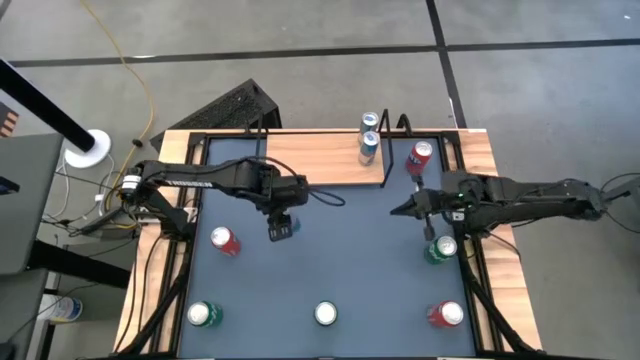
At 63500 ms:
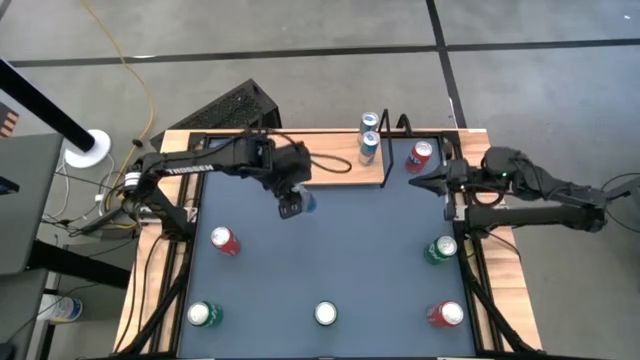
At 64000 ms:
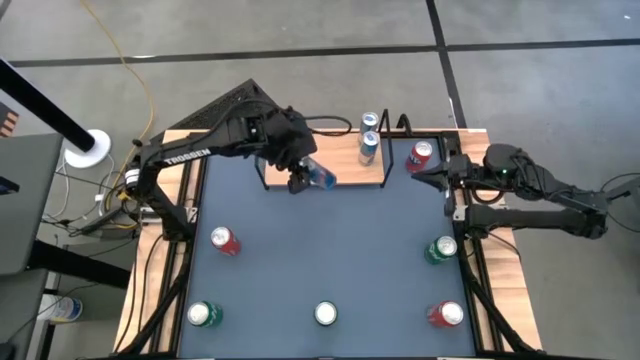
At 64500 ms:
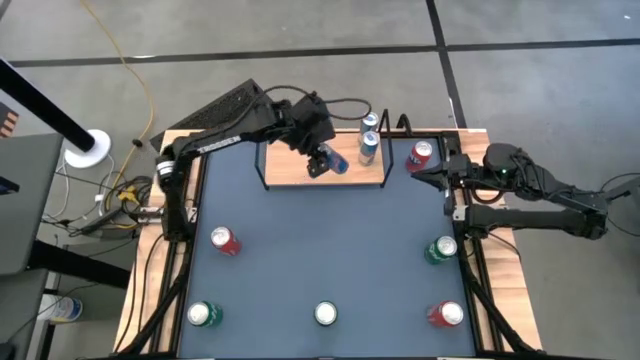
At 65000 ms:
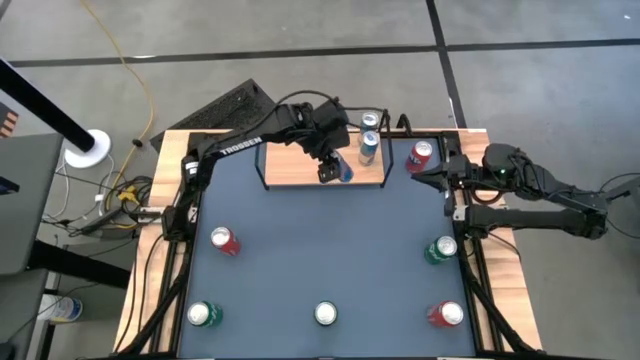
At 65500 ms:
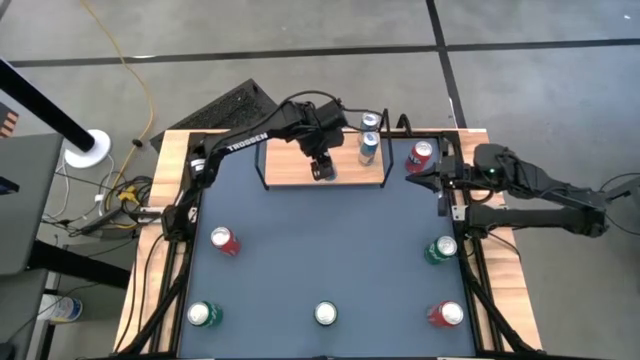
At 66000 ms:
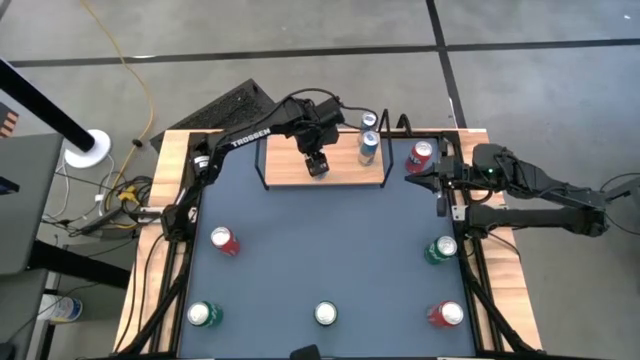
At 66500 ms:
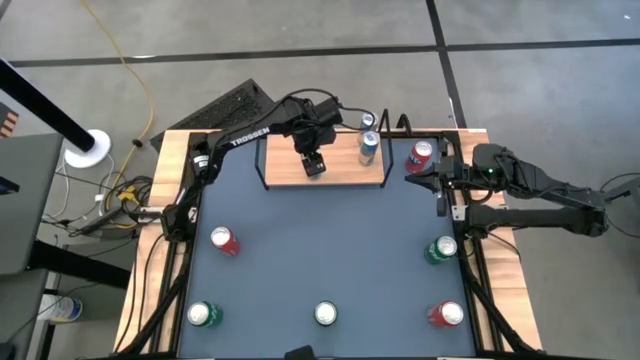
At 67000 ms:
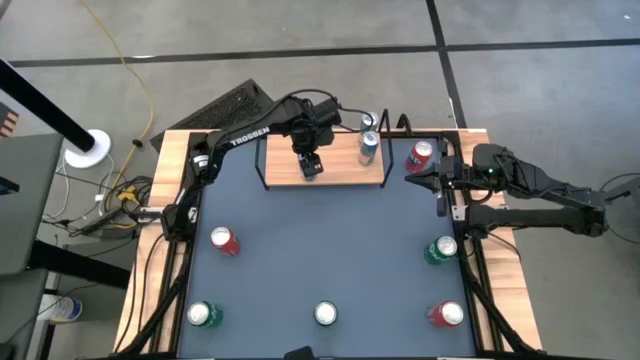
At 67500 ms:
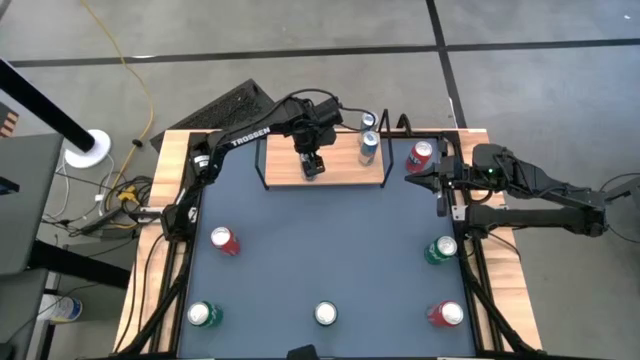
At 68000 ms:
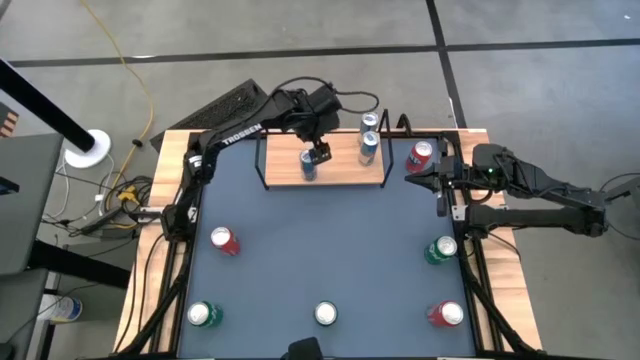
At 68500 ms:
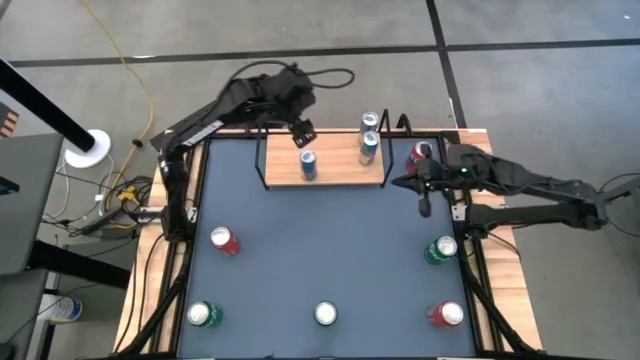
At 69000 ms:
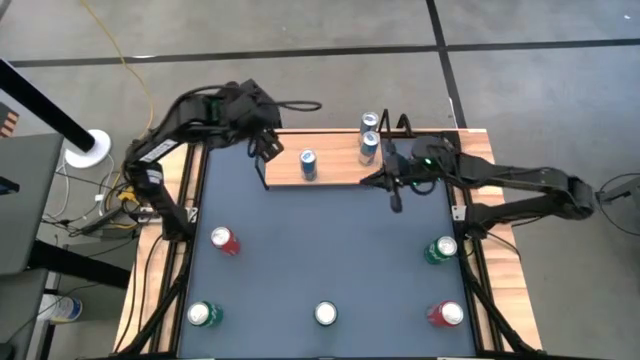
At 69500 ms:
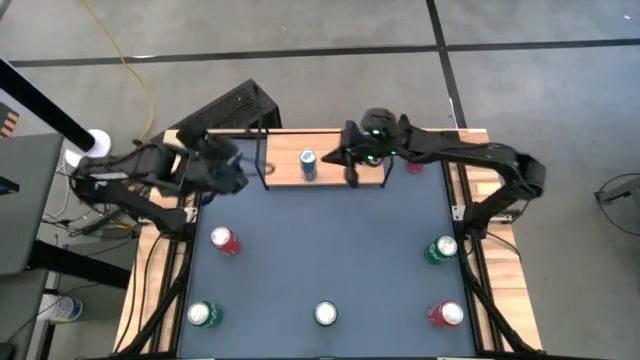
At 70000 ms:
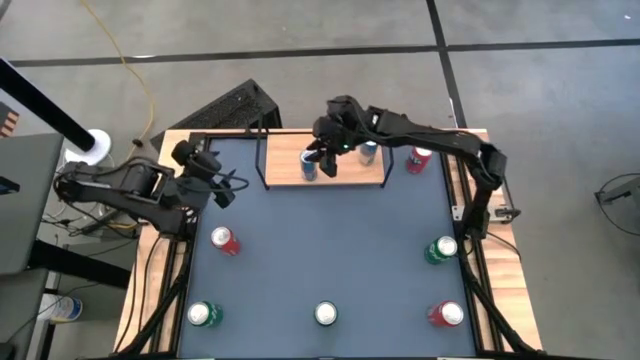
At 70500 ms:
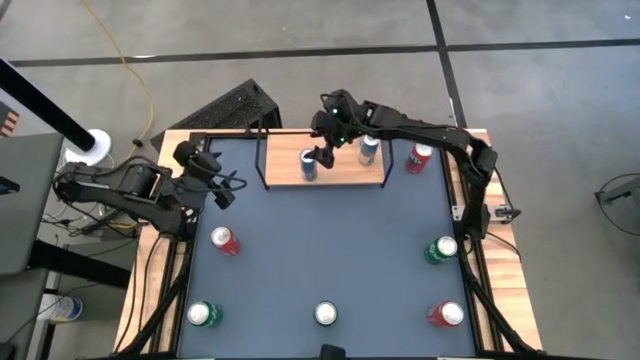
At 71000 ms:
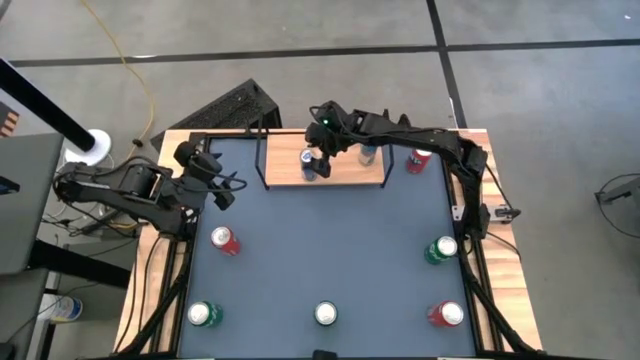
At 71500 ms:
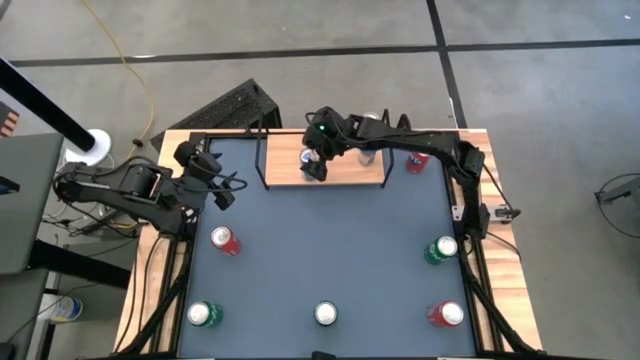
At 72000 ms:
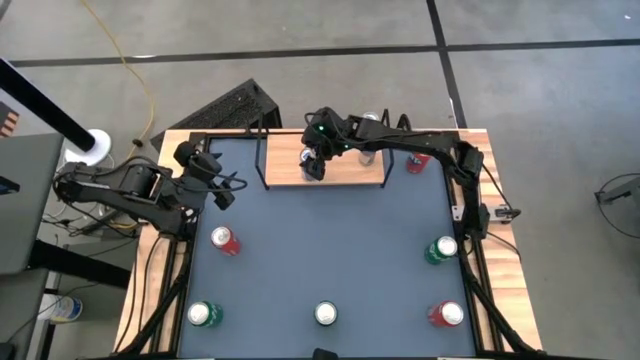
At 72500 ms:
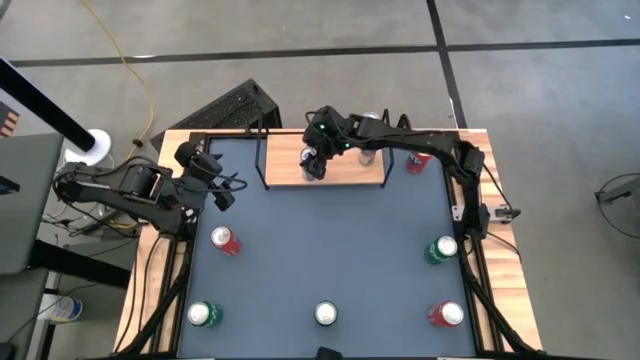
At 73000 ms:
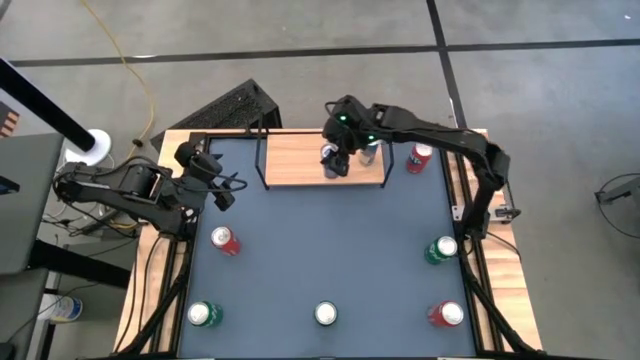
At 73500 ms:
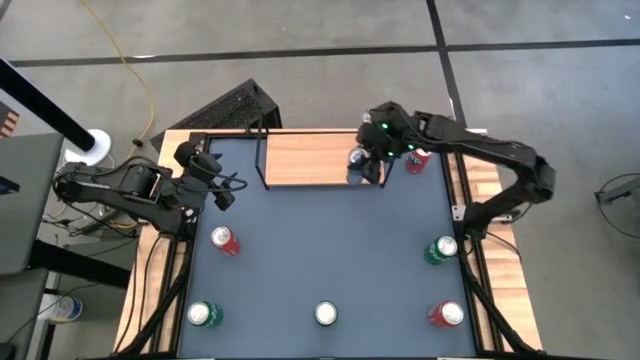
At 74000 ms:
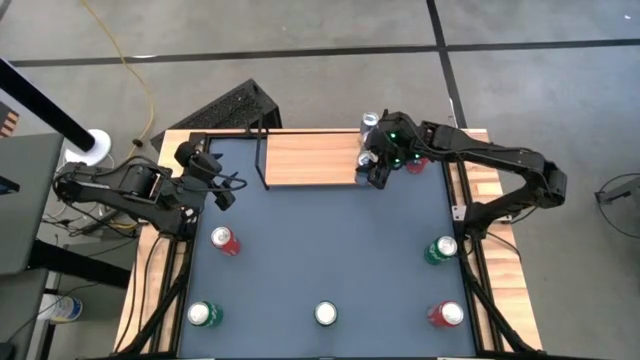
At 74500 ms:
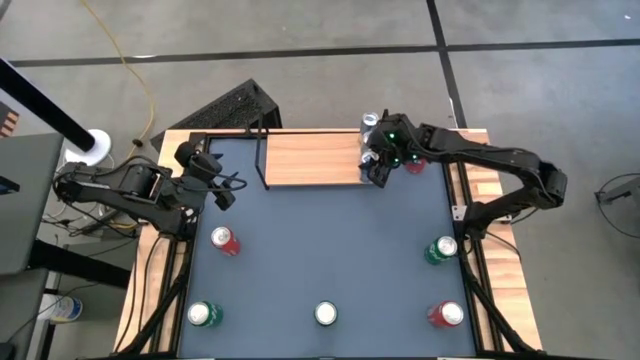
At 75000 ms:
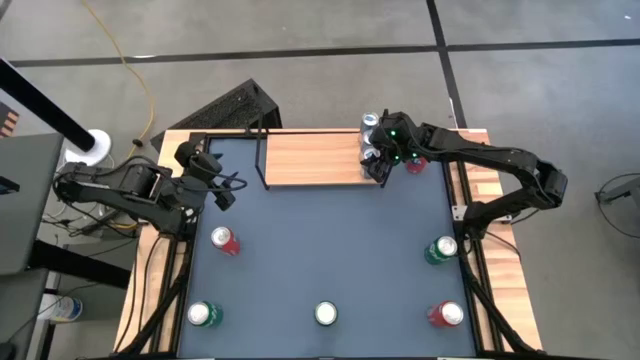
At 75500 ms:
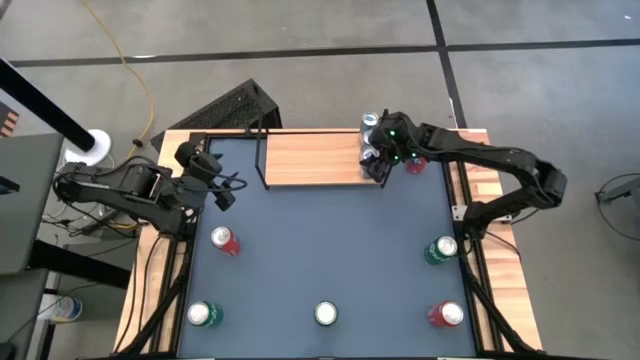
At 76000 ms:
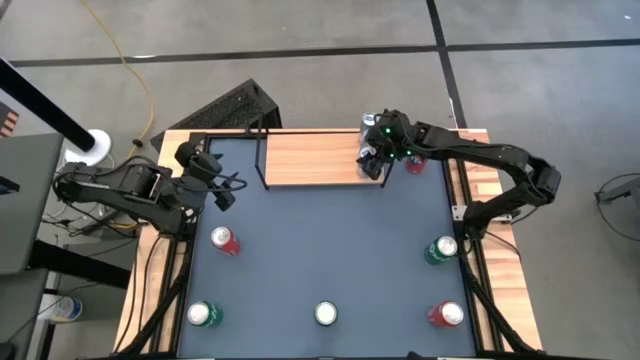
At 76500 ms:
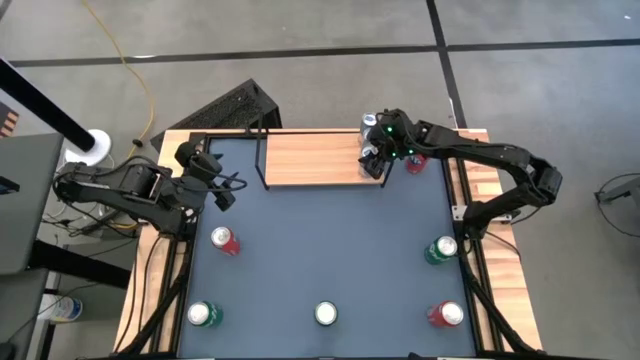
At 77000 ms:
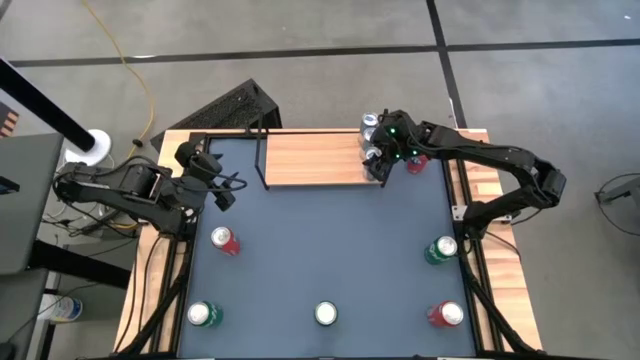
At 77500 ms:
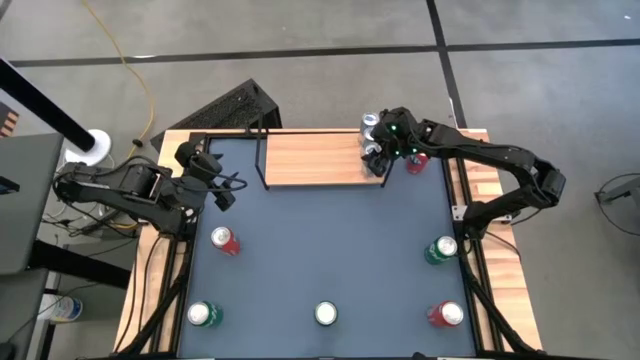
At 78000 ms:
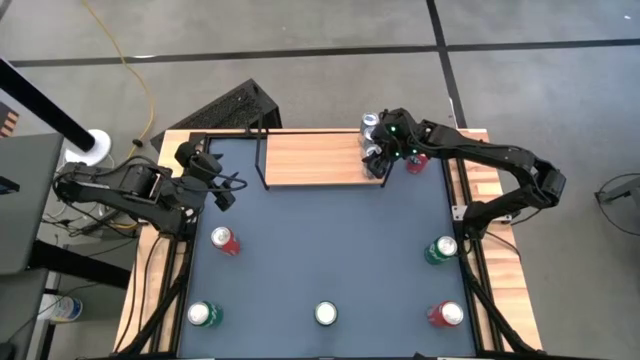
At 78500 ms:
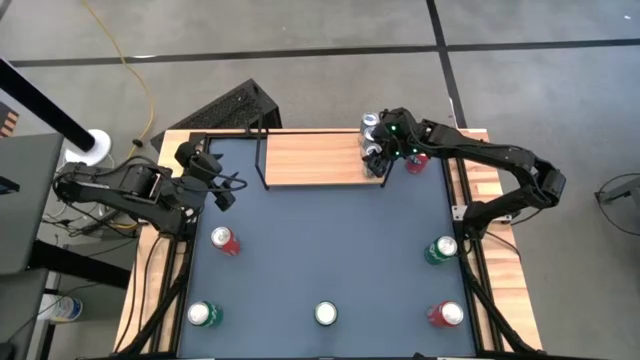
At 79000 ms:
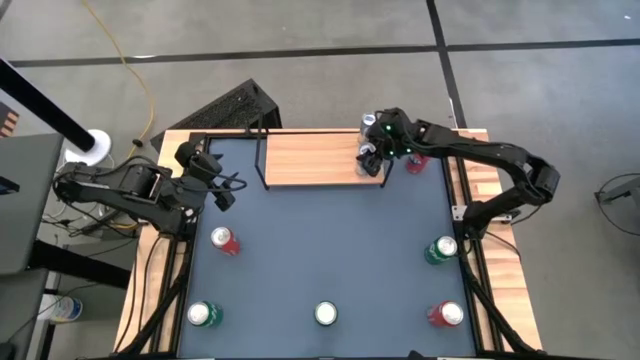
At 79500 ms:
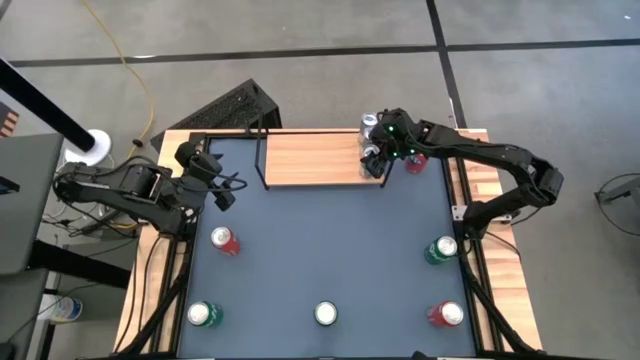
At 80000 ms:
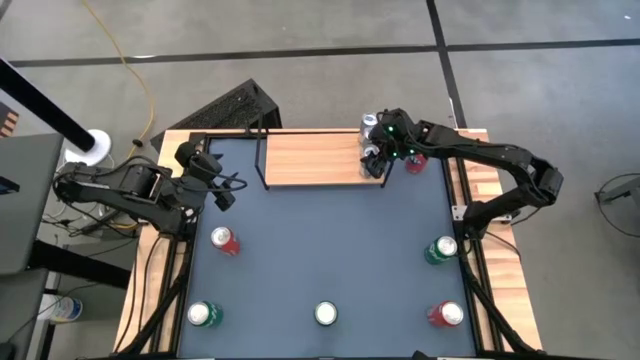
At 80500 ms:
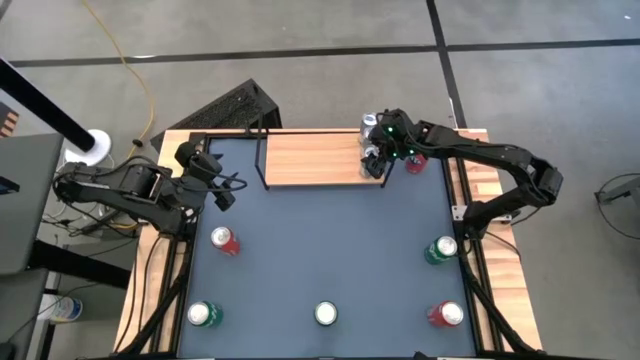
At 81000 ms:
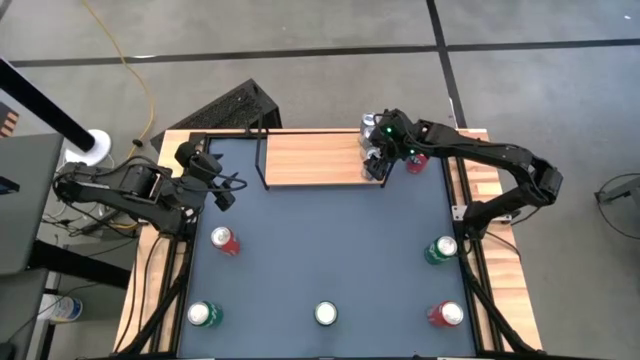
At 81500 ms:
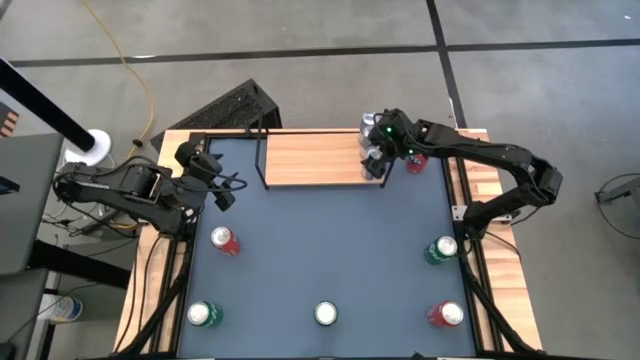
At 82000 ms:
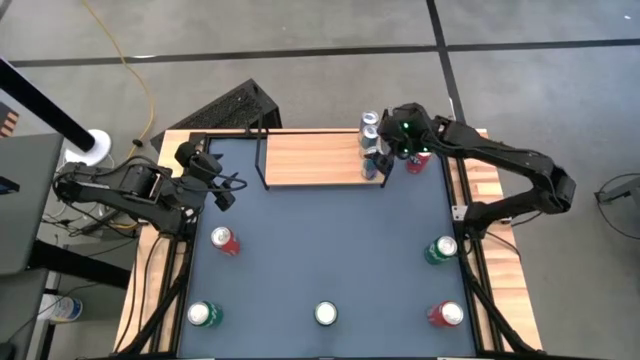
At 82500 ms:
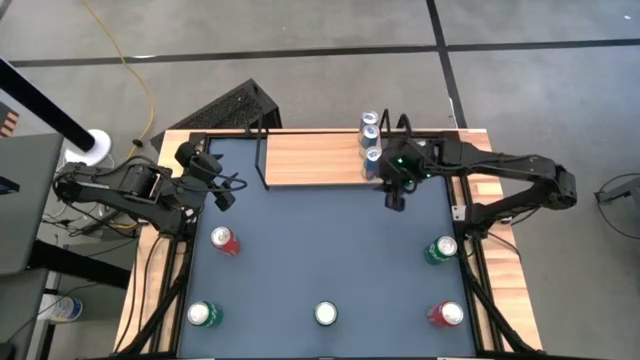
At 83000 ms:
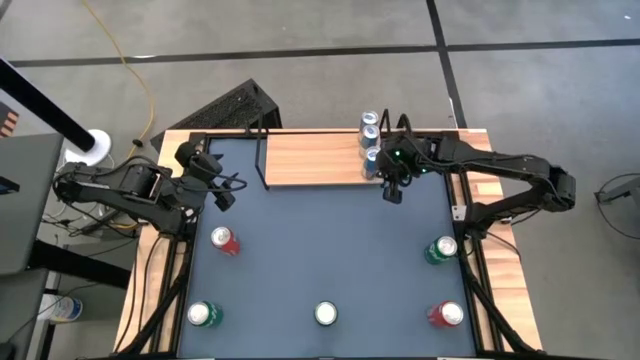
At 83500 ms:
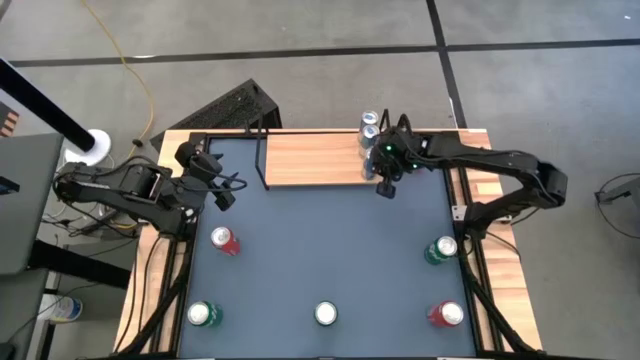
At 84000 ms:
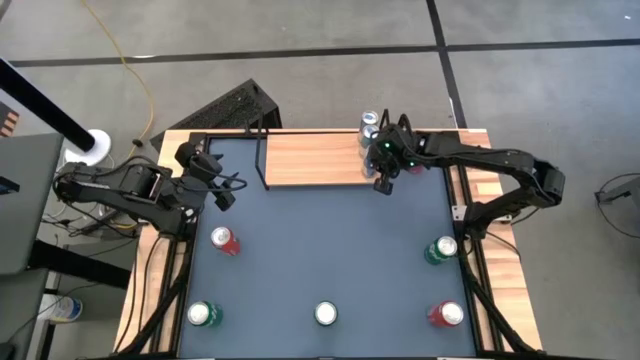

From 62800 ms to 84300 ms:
Task: Place canned beverage on shelf
Put the blue soda can on the shelf aligned with the other blue soda can
